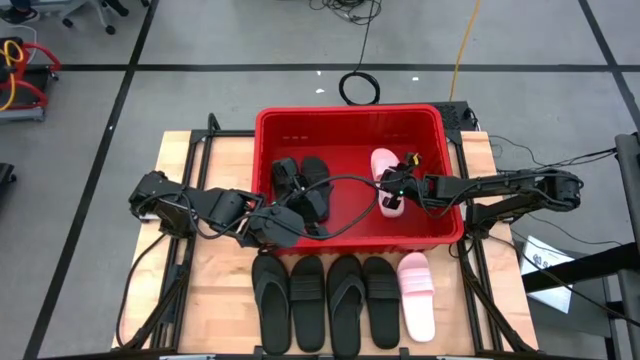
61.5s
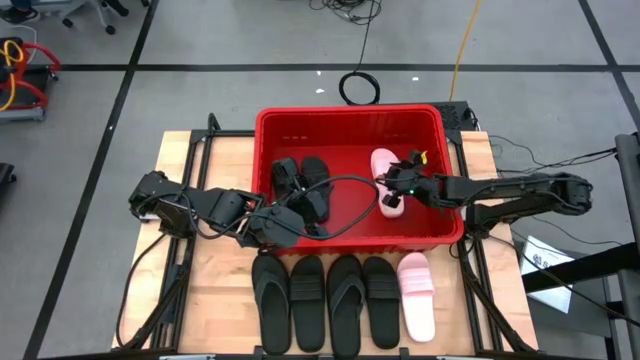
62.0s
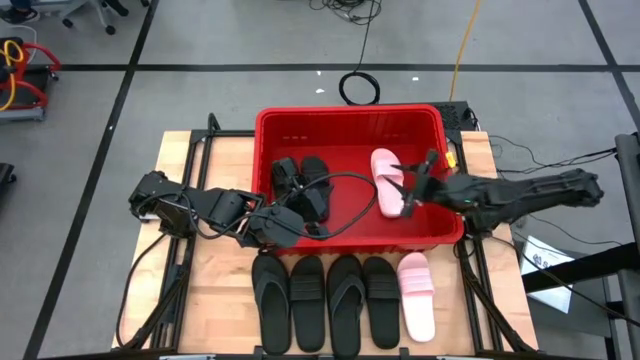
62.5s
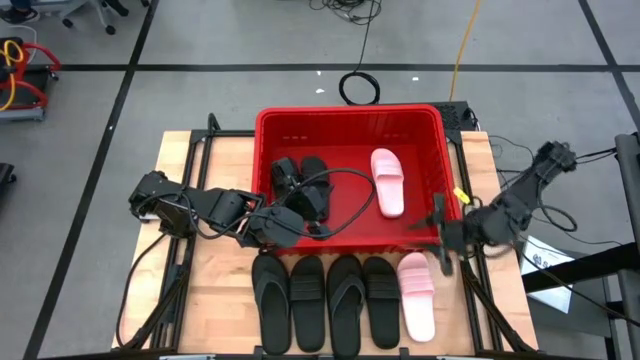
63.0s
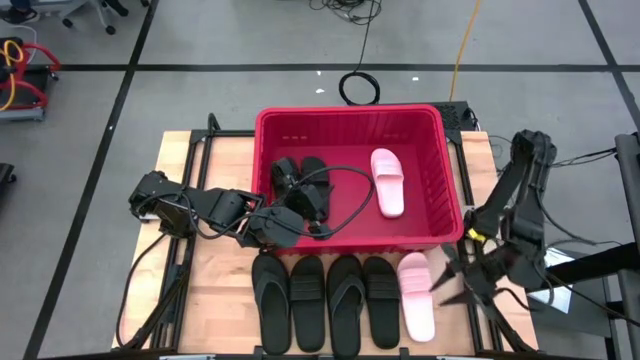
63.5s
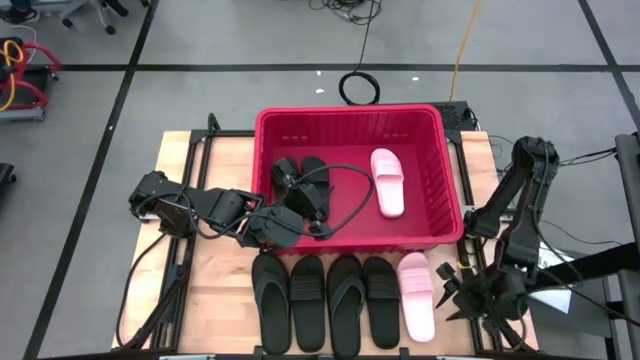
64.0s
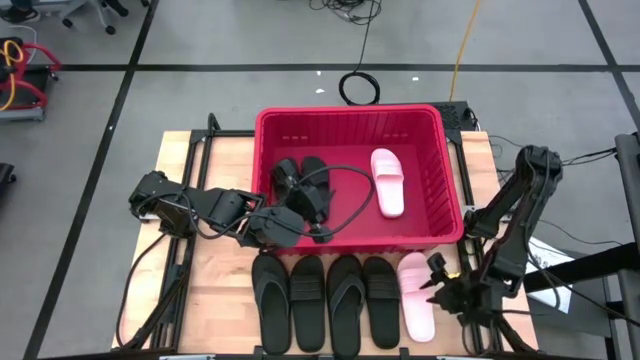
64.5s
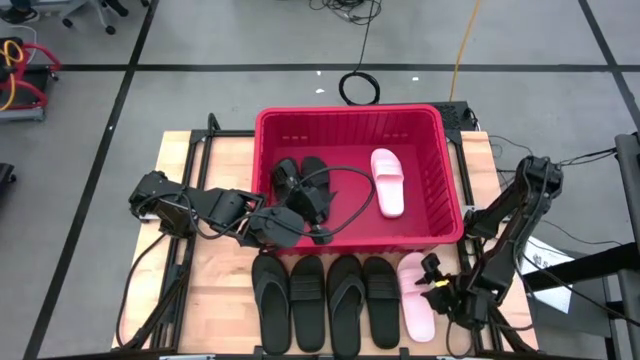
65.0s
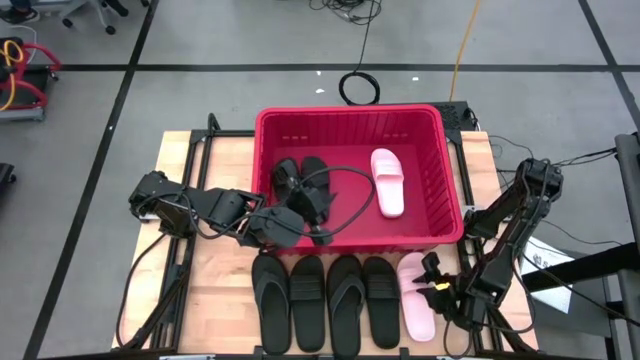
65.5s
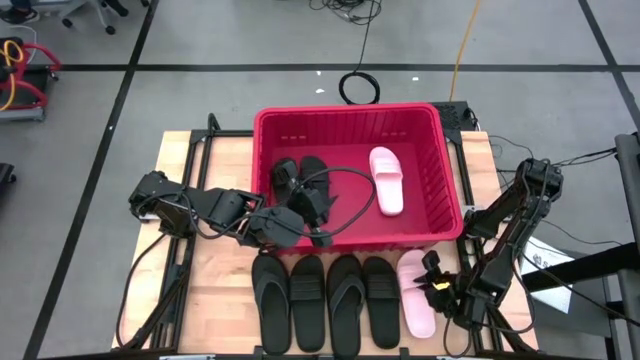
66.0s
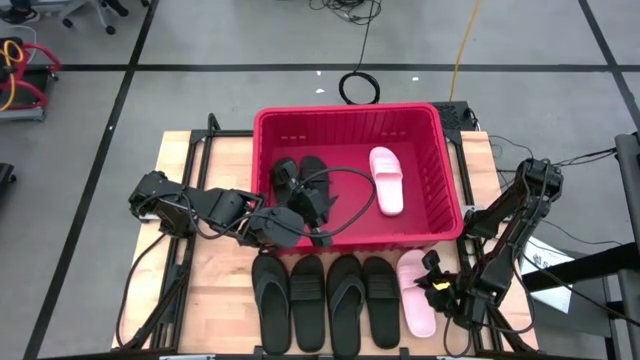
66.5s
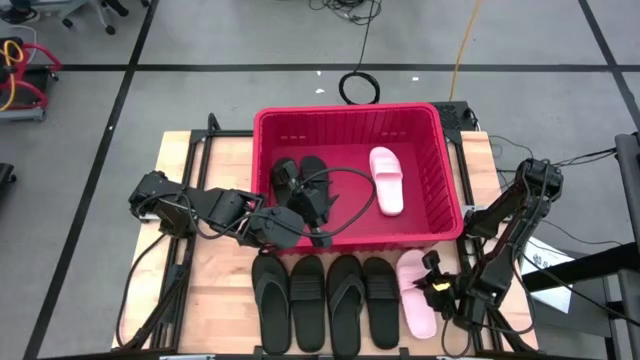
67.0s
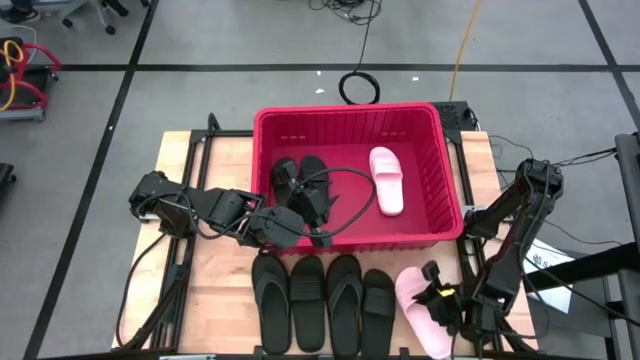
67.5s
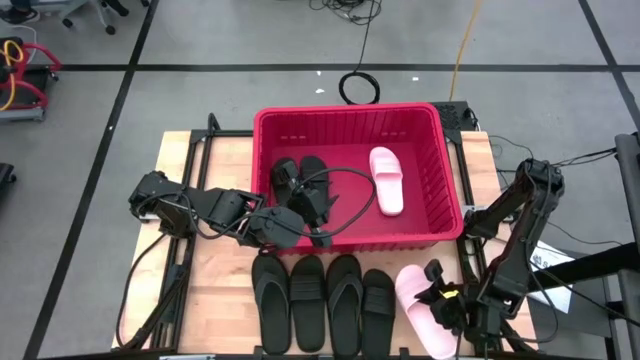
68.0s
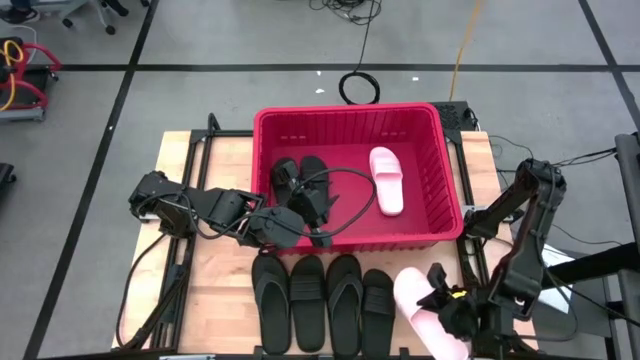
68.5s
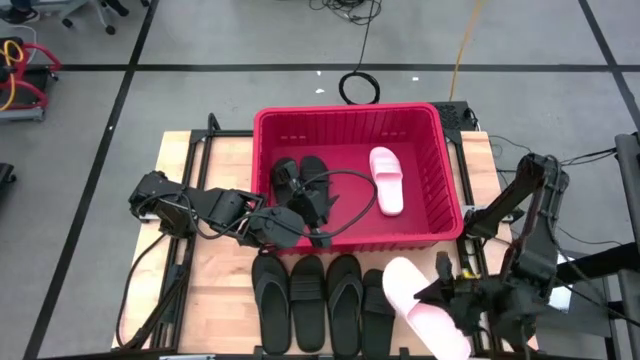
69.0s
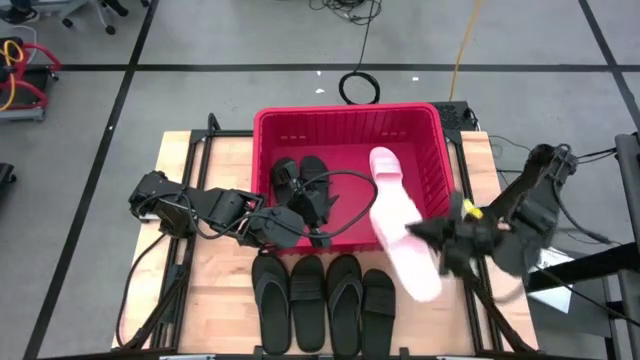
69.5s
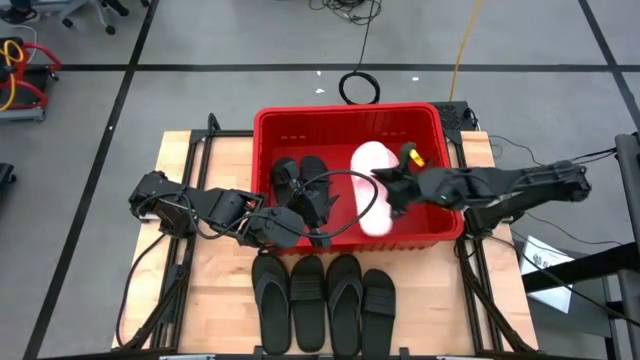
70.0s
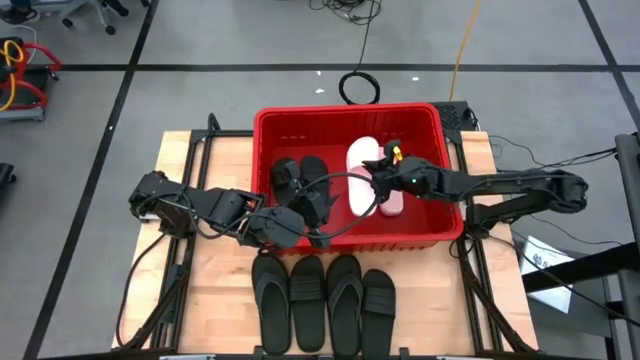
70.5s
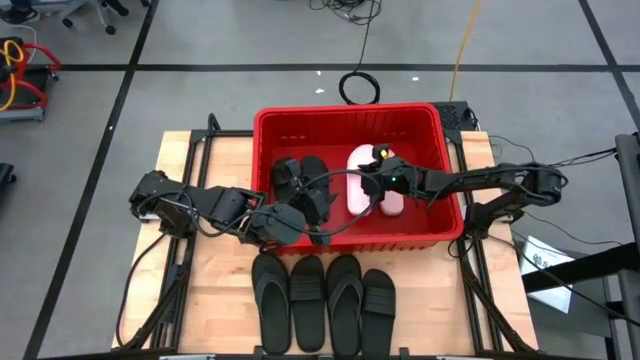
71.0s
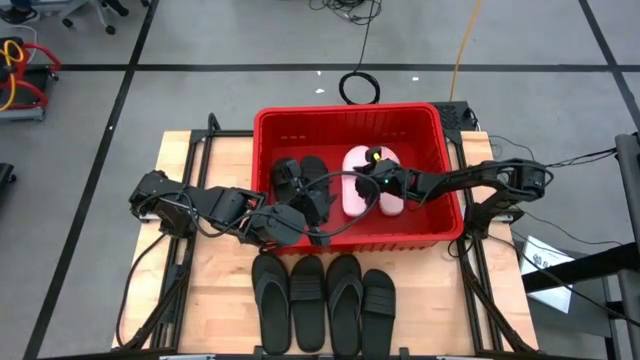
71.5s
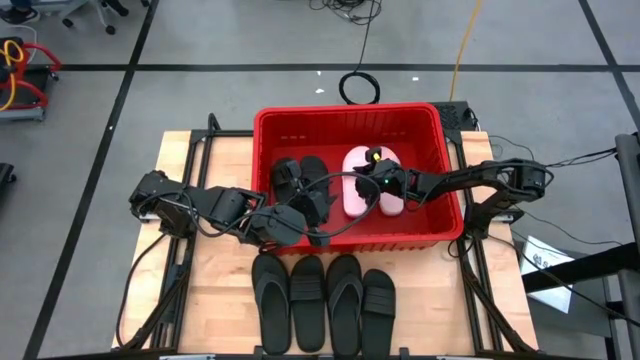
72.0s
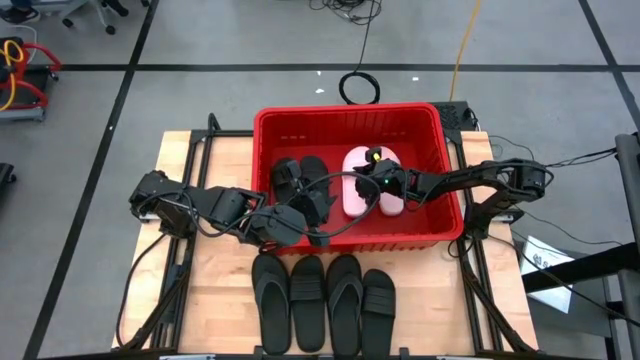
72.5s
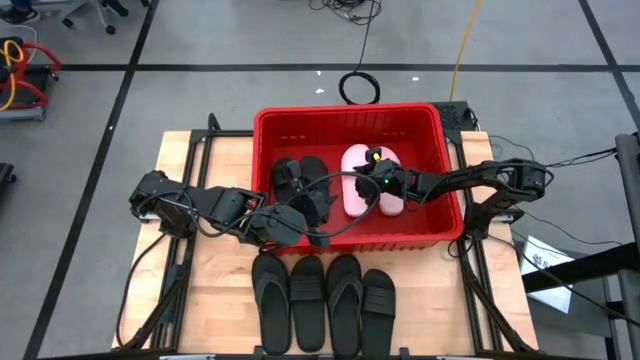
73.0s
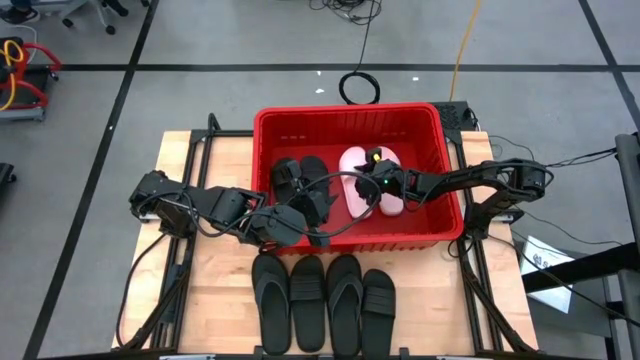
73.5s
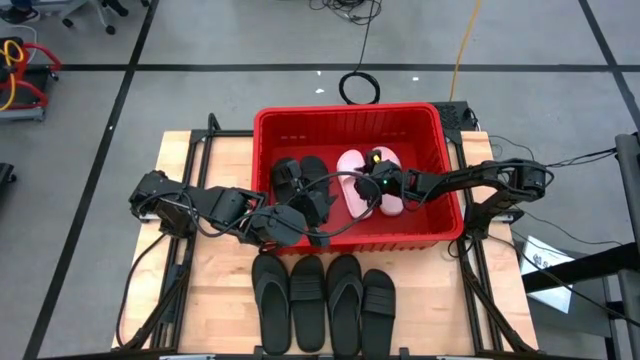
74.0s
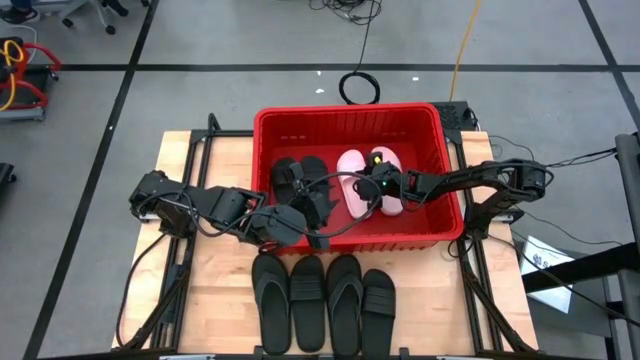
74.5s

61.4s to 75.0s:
Task: Pick and place slides into bin
Put the pink slide into the red bin

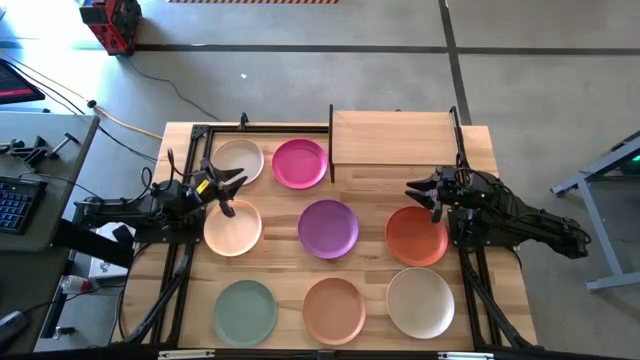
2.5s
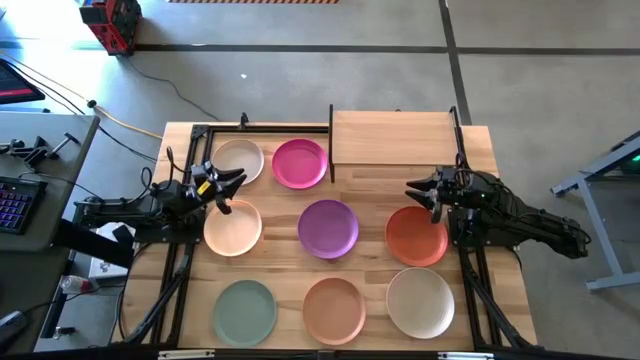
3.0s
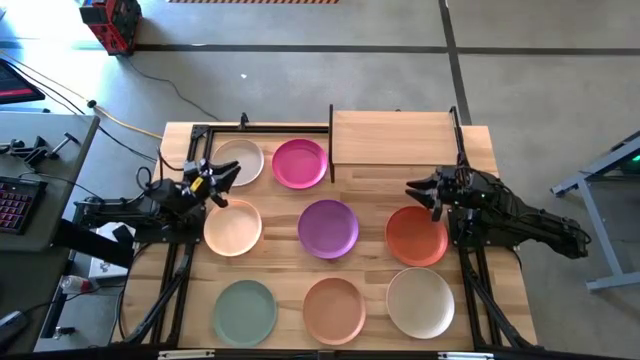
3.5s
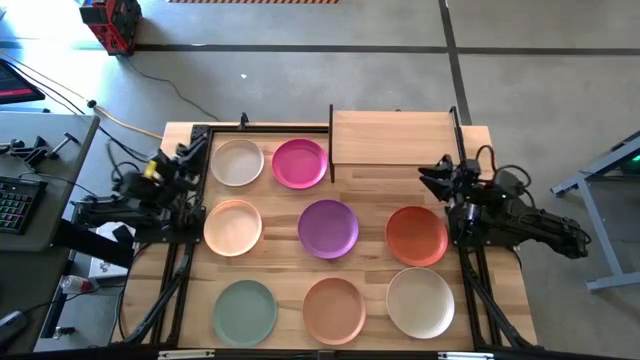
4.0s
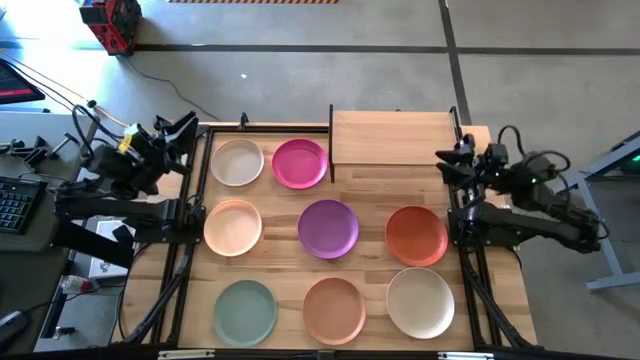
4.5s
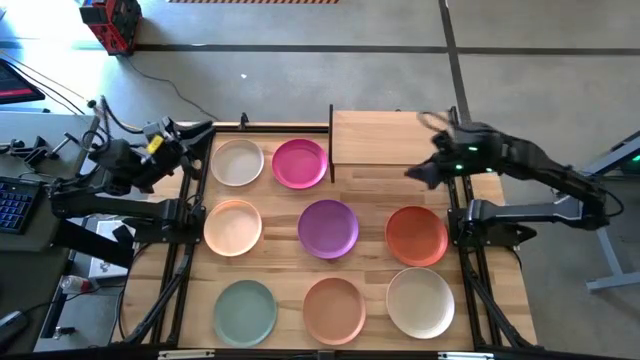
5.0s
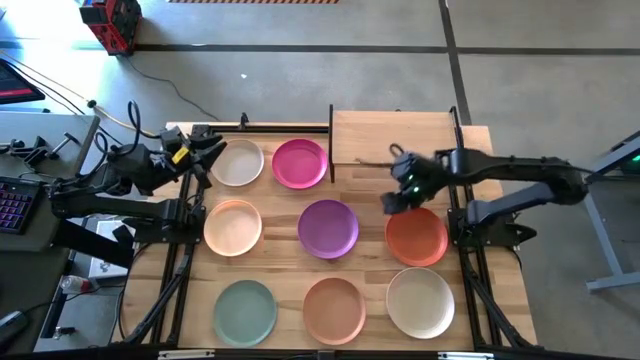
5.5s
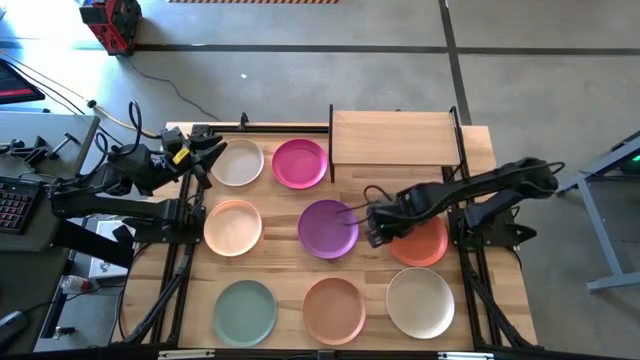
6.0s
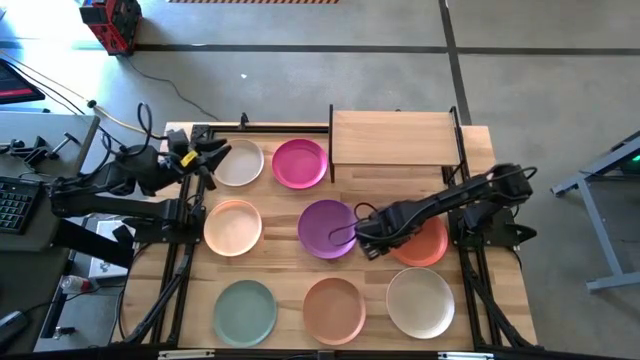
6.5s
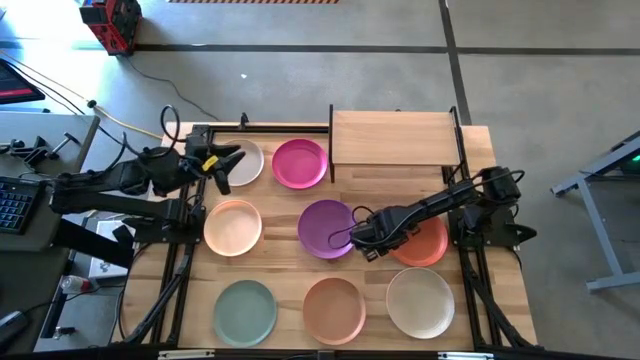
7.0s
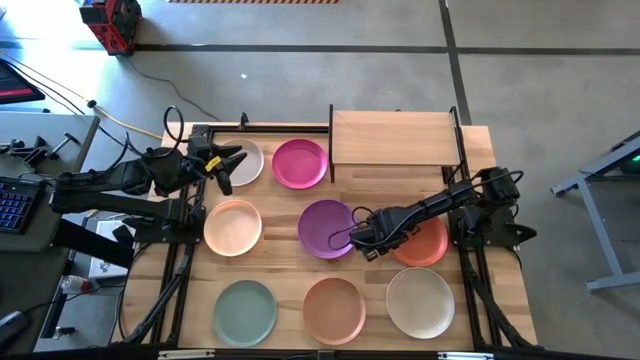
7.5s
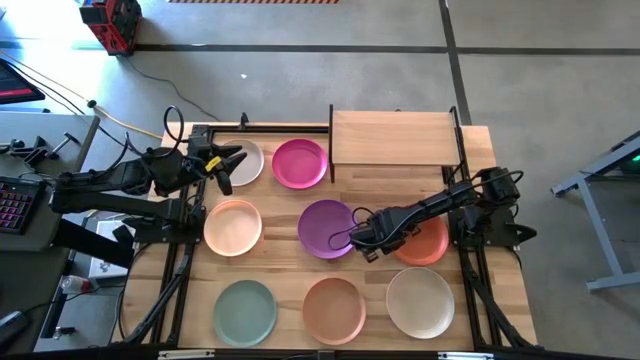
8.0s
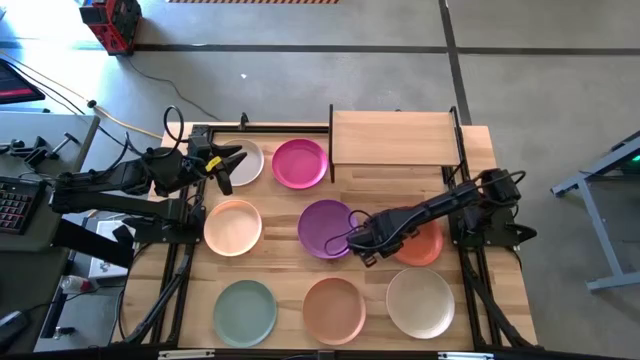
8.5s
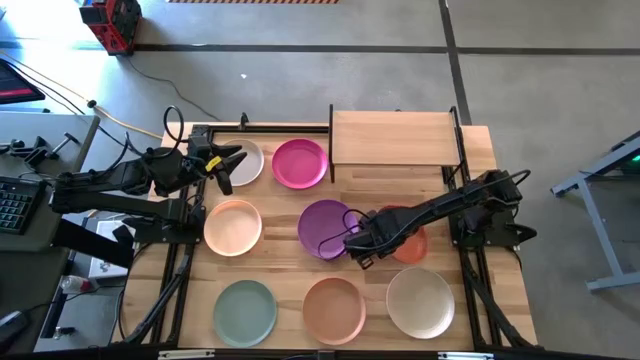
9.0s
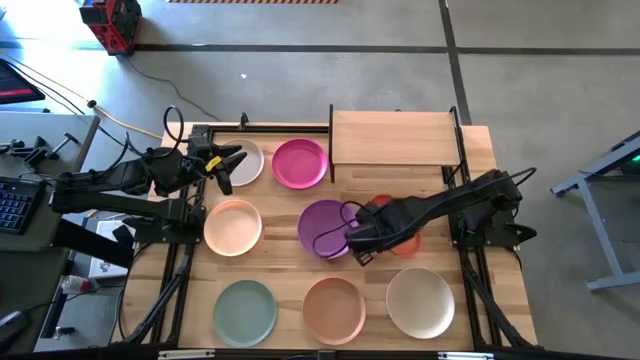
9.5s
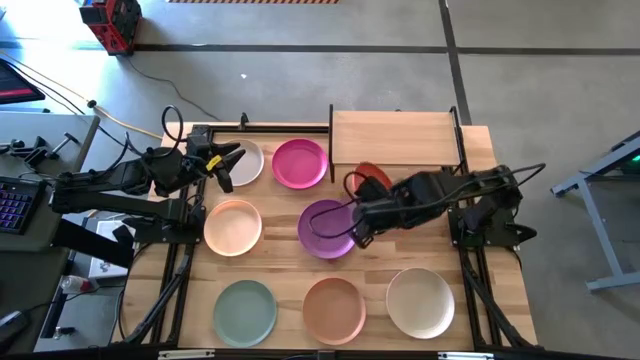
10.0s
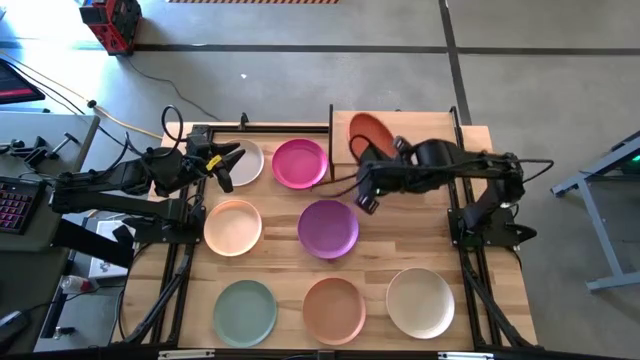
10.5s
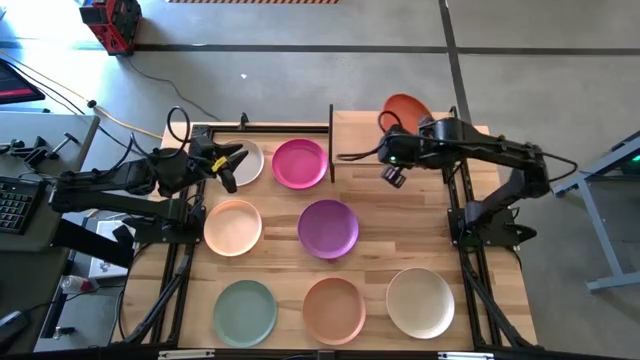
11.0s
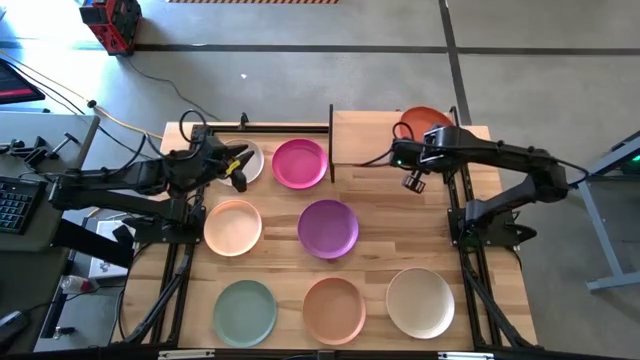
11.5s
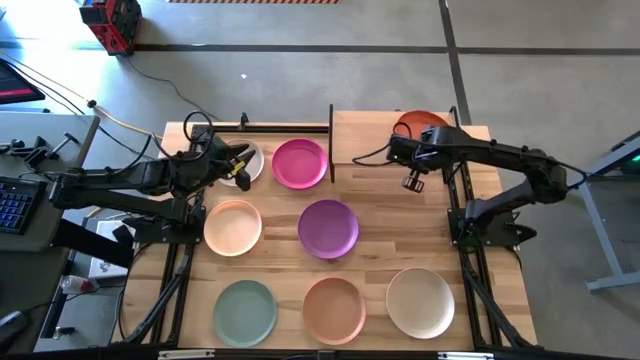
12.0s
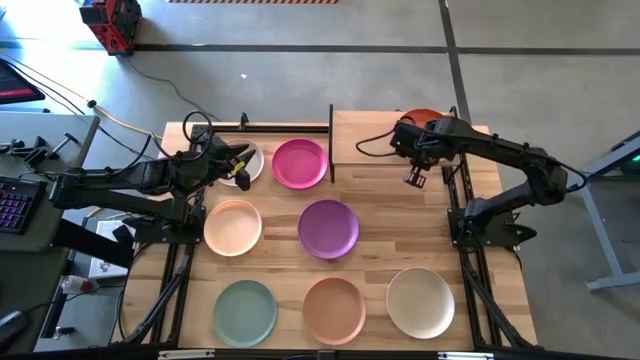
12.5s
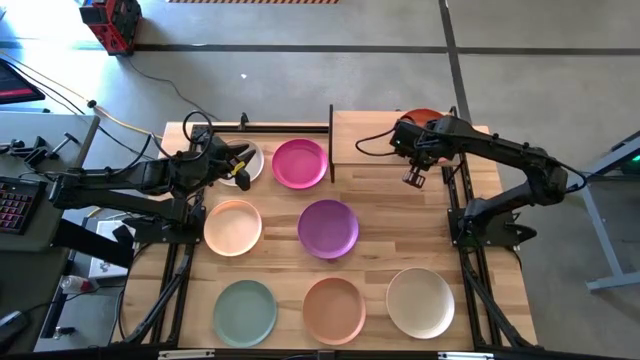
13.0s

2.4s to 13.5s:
Task: Place and stack plates onto a shelf
Put the orange plate on the shelf
